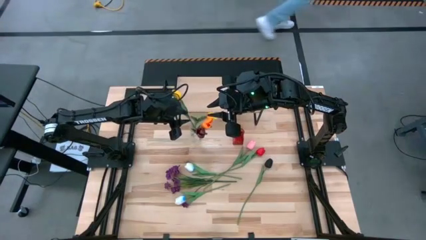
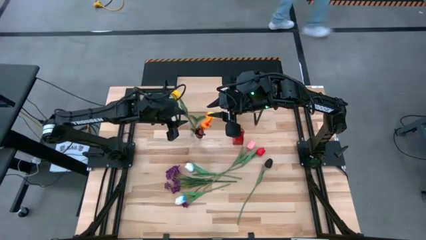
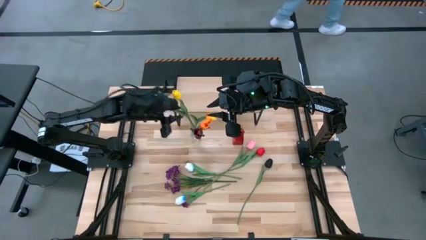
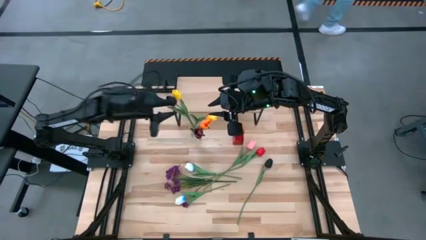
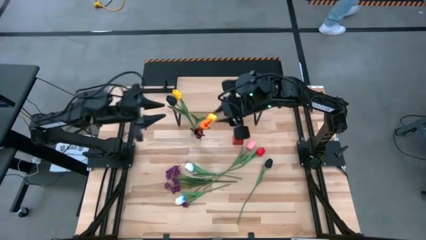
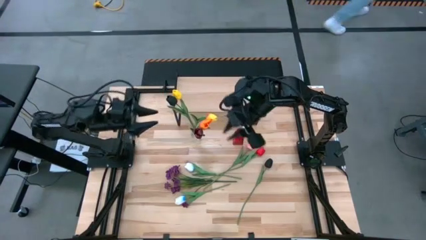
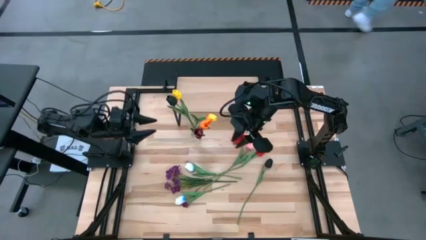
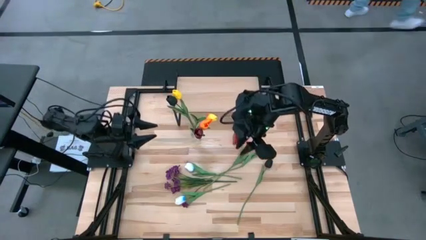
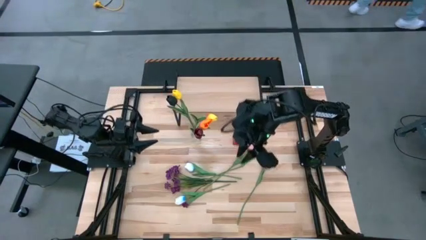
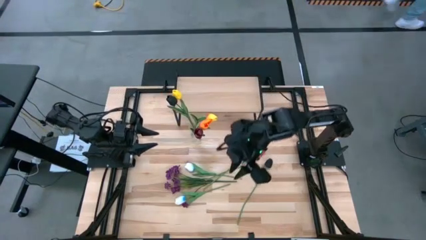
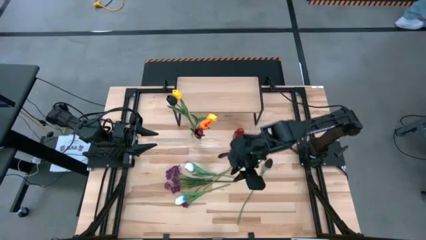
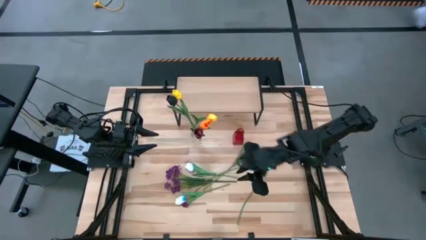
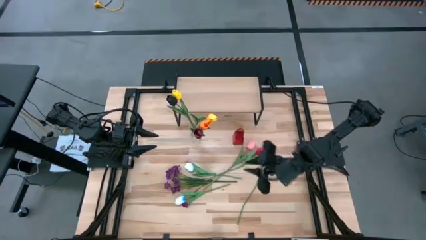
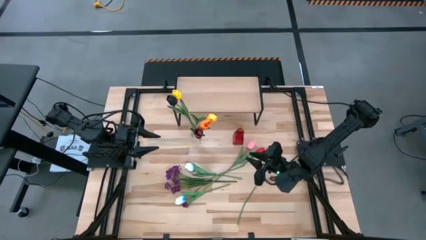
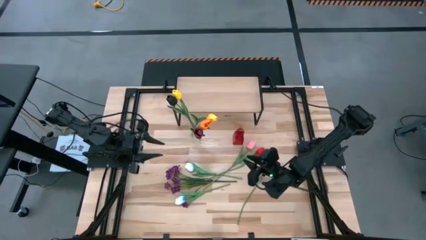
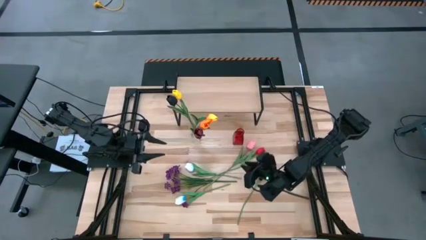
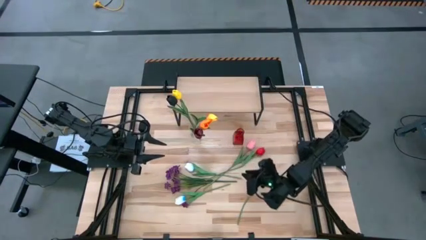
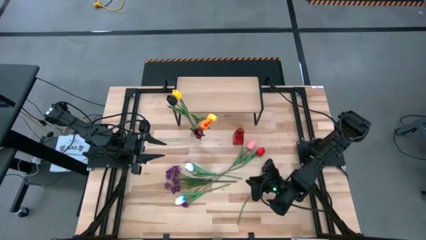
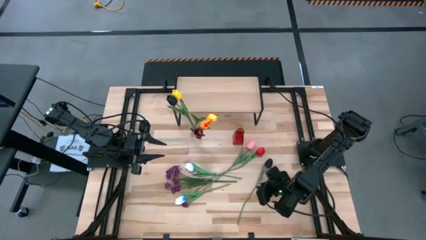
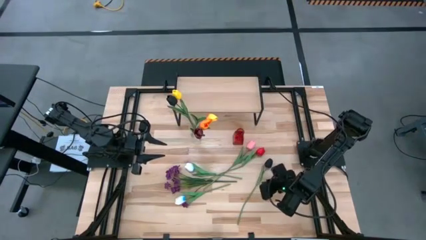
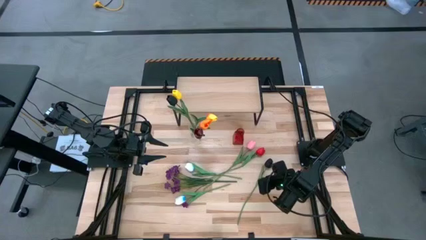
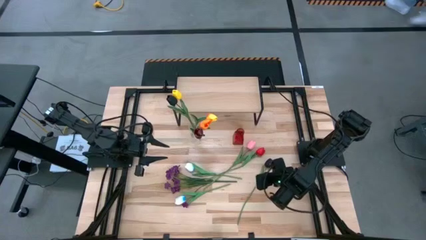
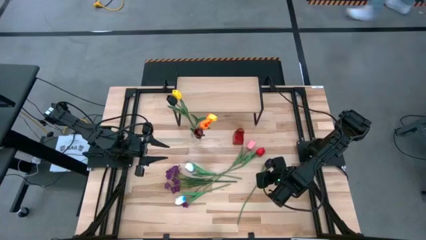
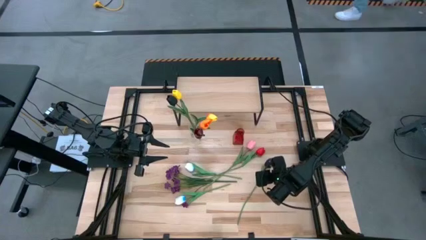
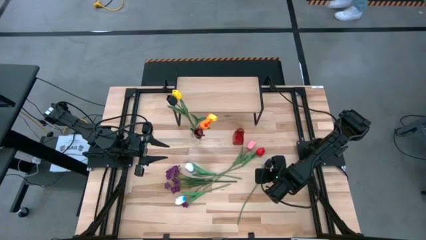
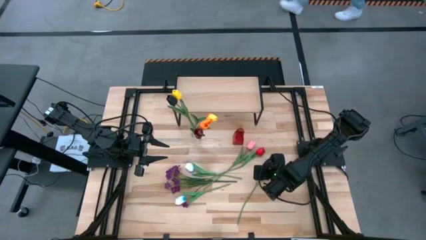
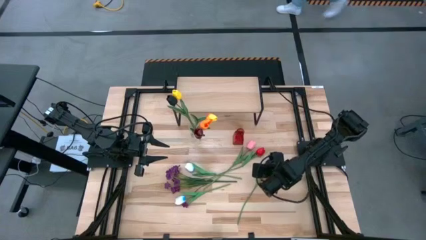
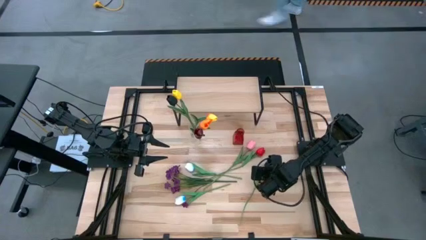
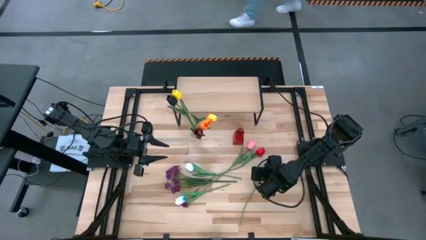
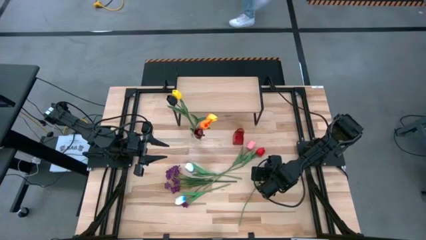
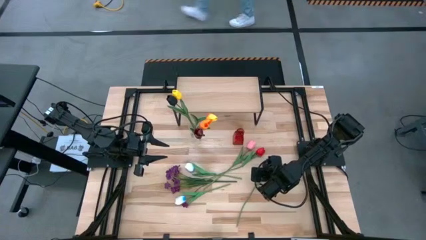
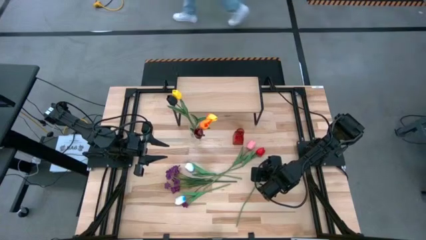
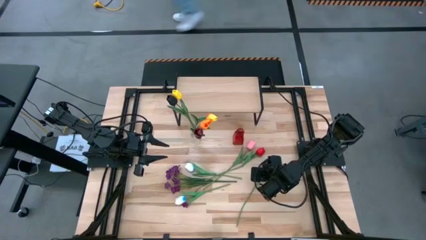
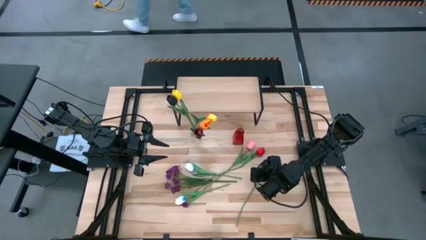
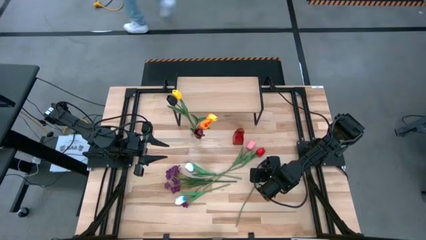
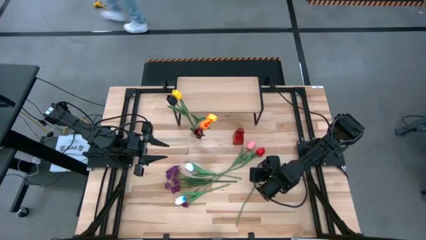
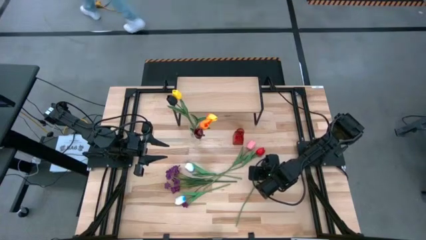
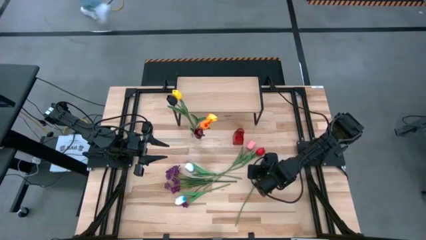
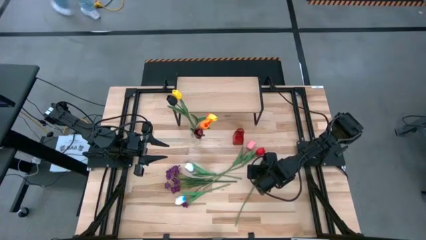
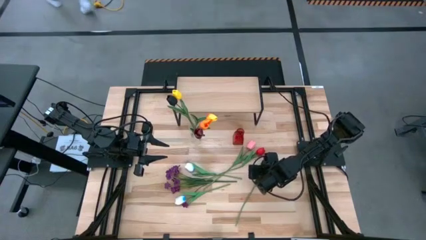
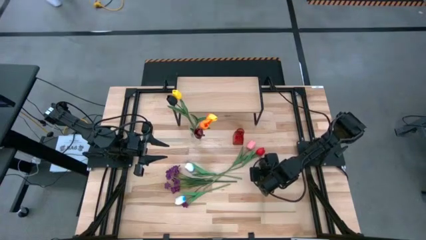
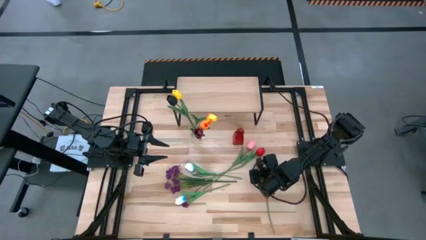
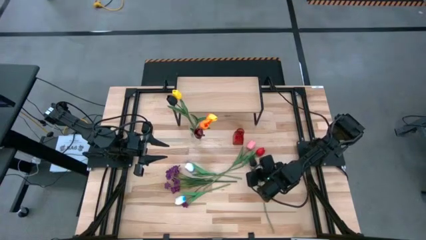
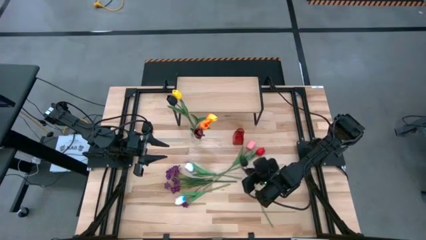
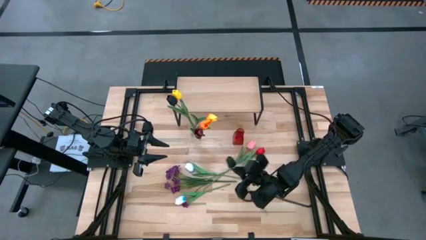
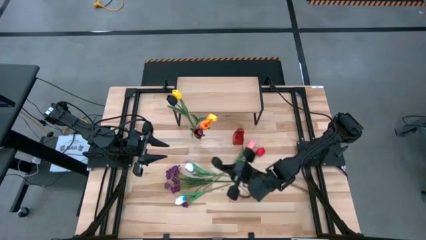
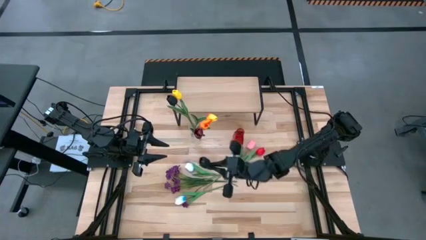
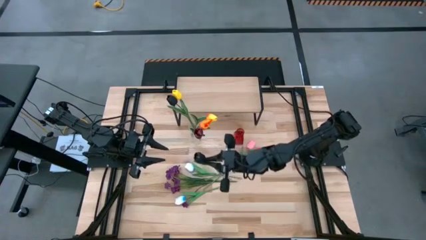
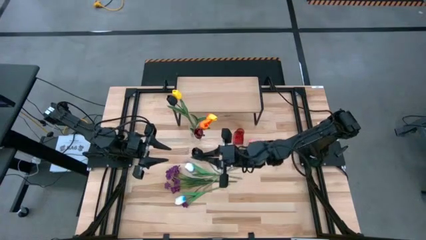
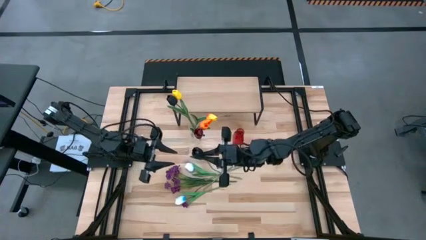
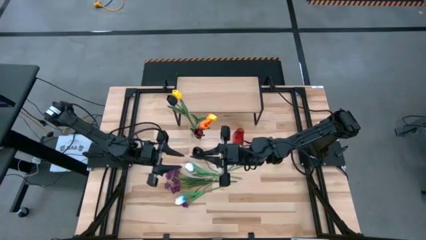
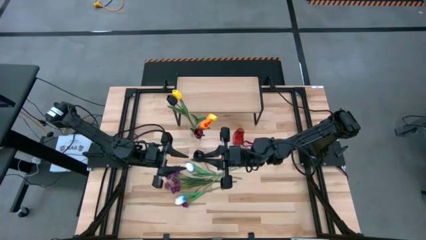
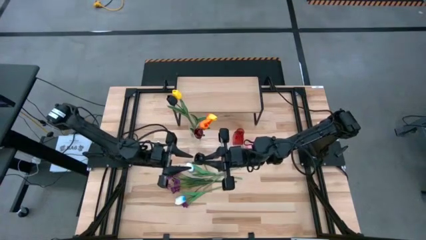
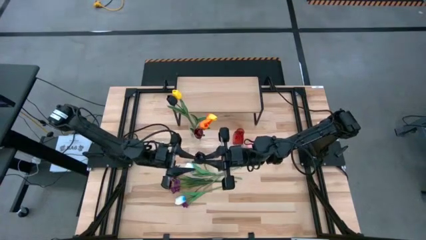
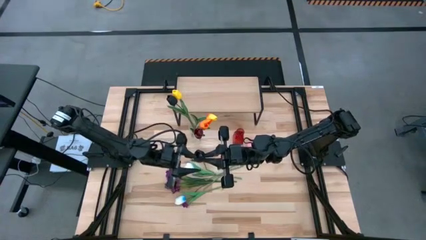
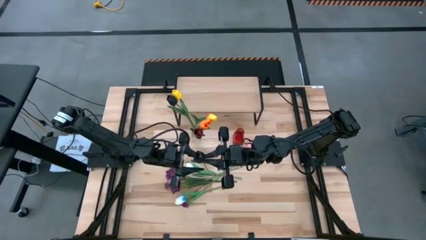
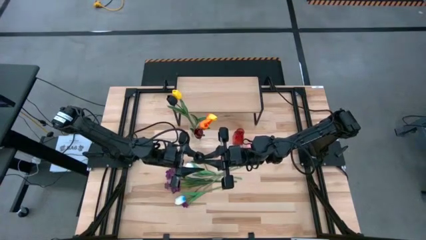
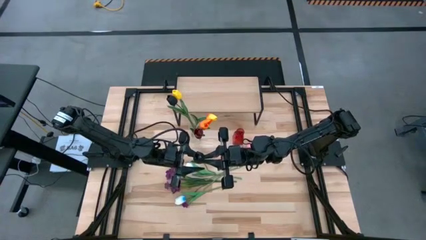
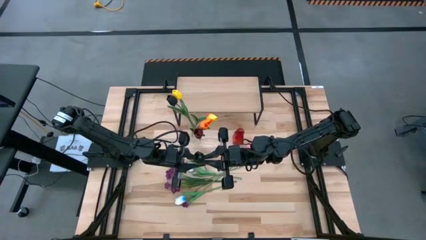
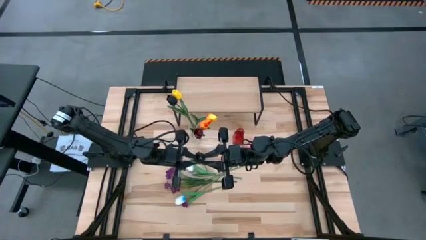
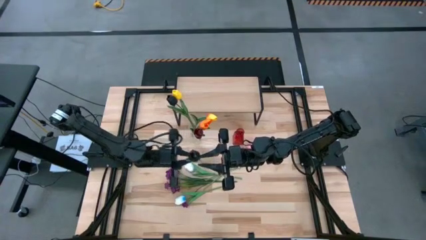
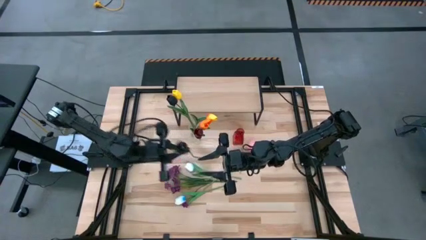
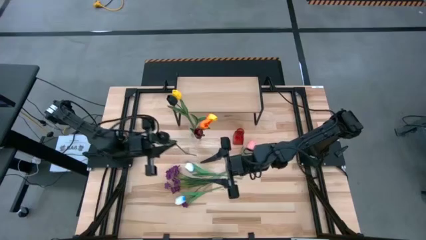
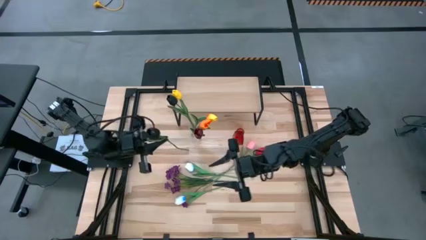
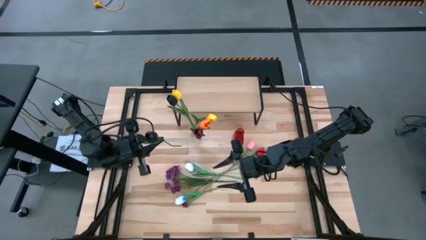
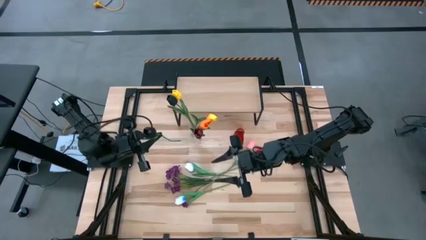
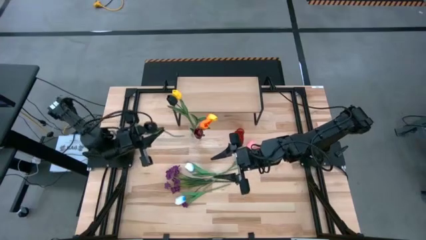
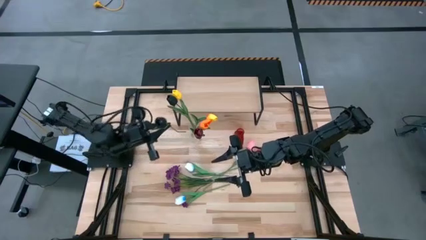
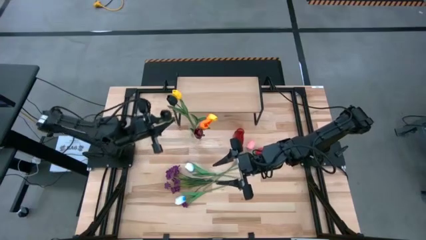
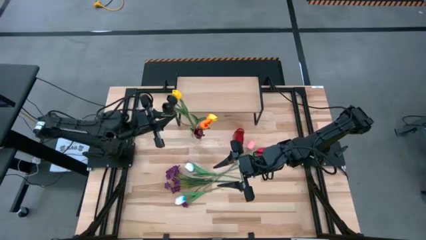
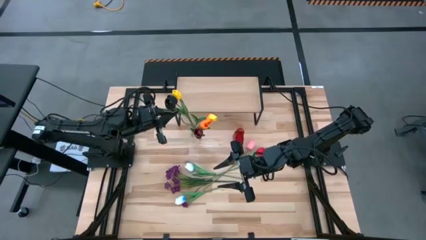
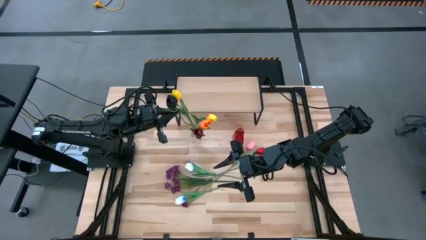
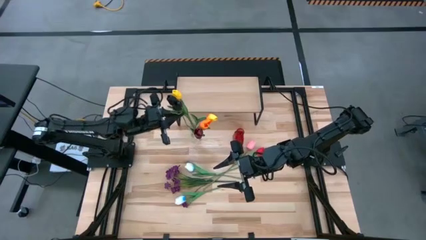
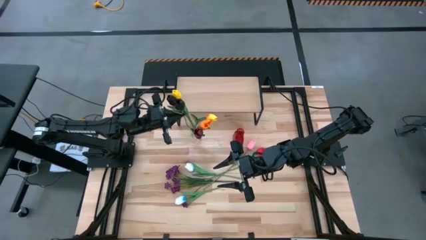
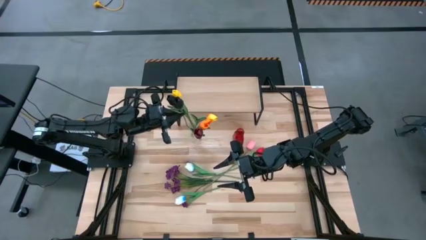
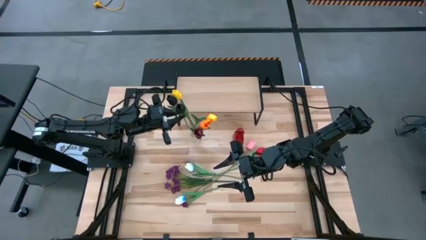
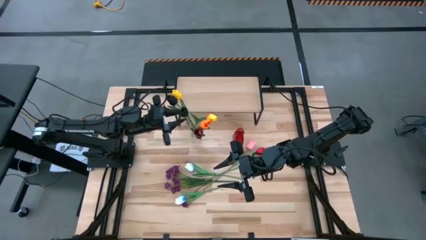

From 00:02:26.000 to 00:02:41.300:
Task: Pick and place flowers into a vace then onto a shelf
Put the black tulip into the transparent vase

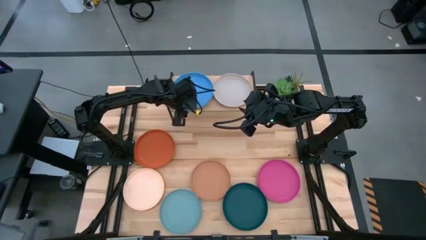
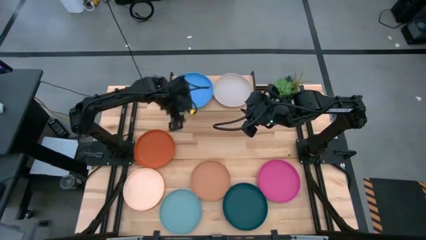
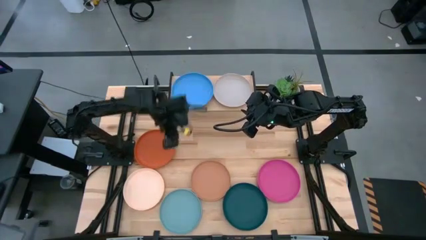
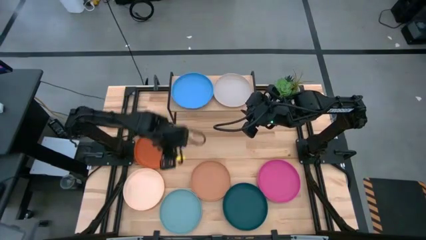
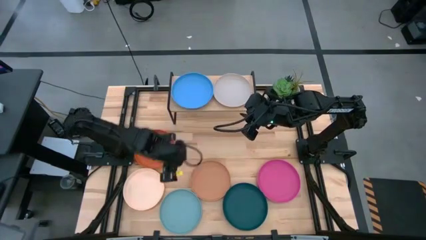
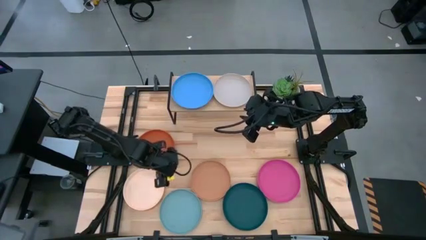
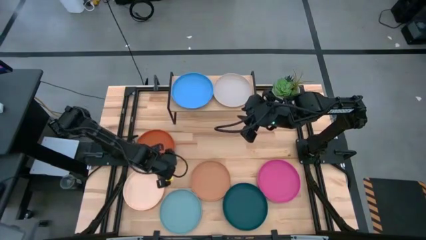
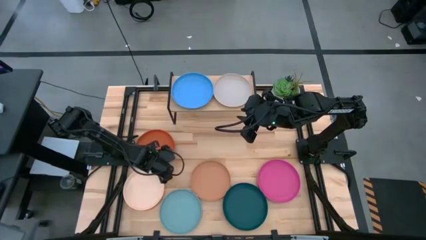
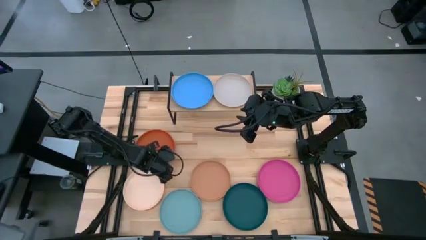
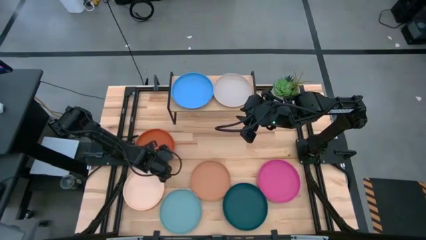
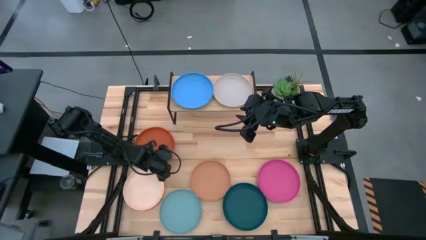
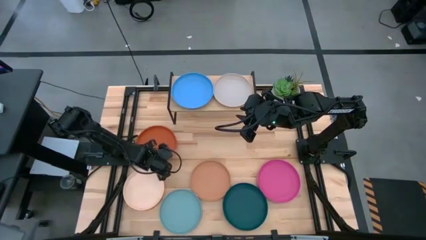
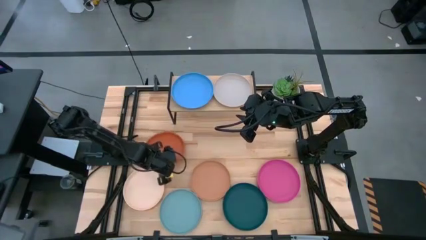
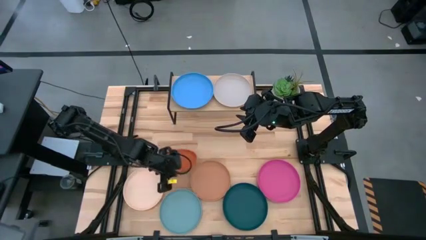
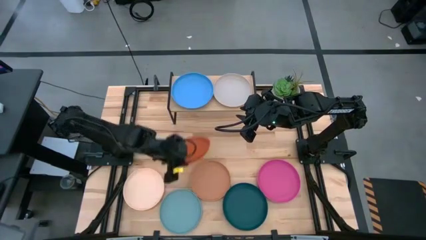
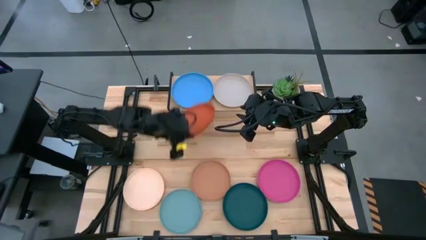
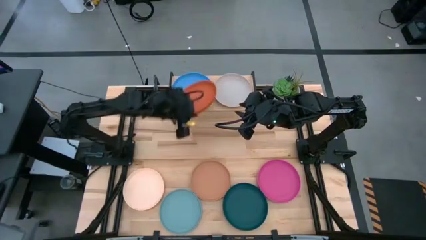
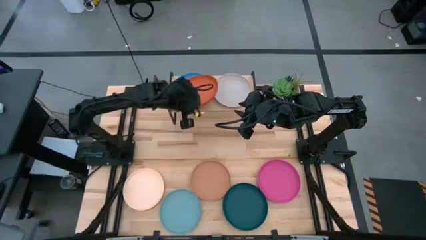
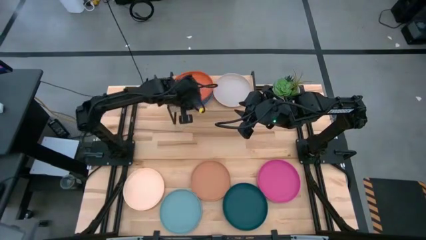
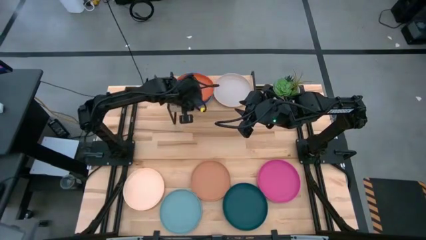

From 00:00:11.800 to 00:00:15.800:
Task: Place and stack plates onto a shelf
Stack the orange plate on top of the blue plate on the shelf
